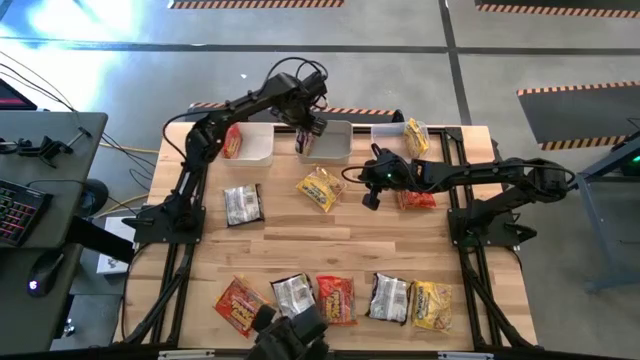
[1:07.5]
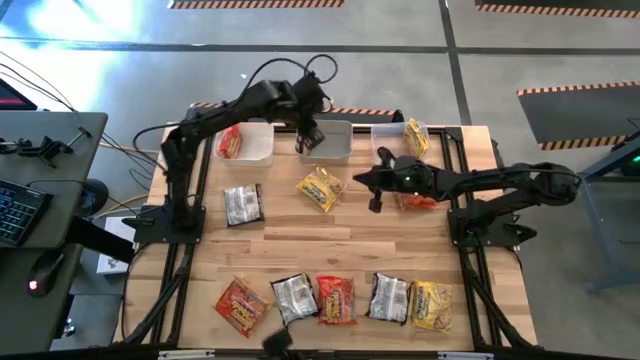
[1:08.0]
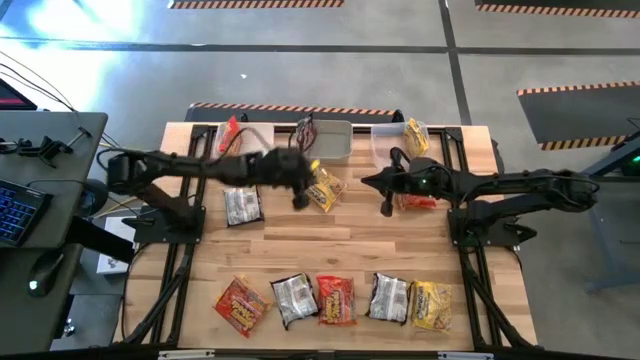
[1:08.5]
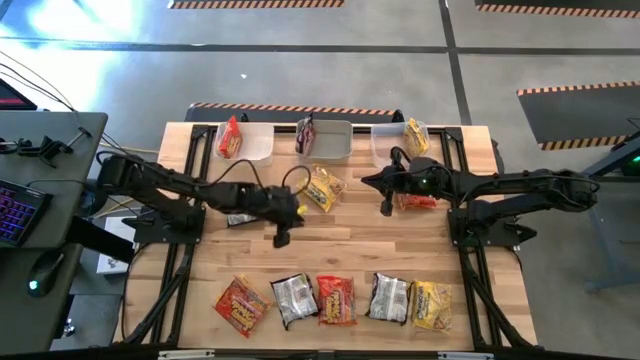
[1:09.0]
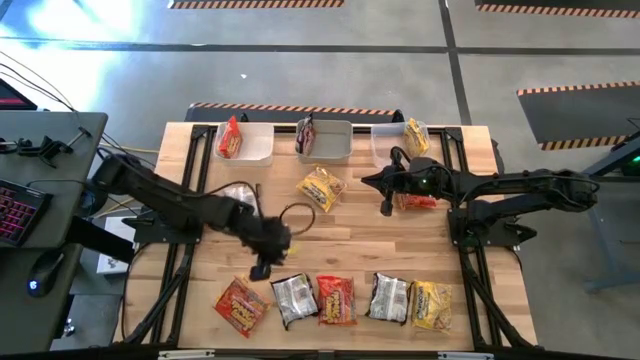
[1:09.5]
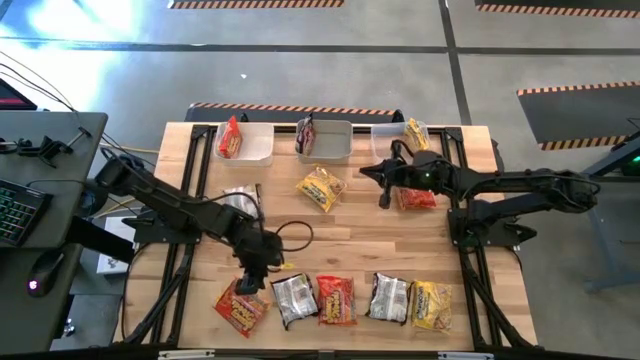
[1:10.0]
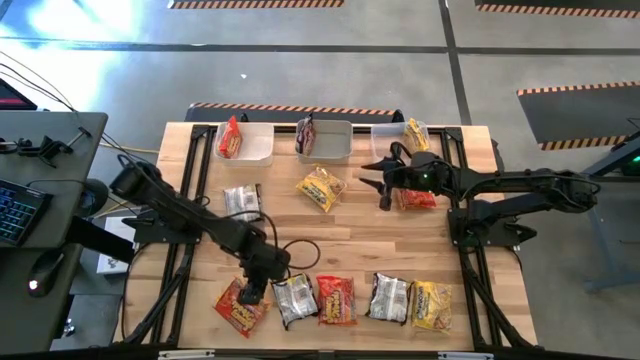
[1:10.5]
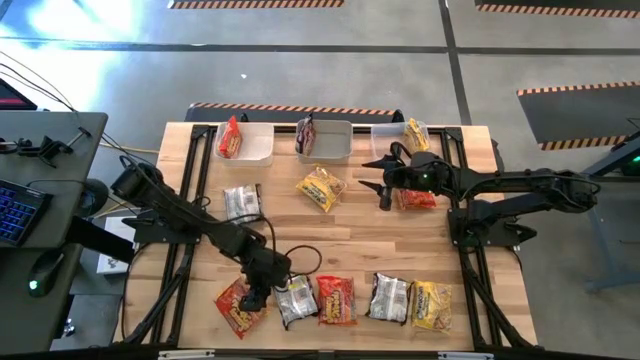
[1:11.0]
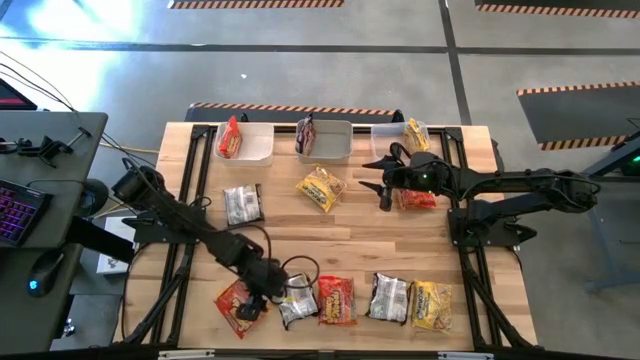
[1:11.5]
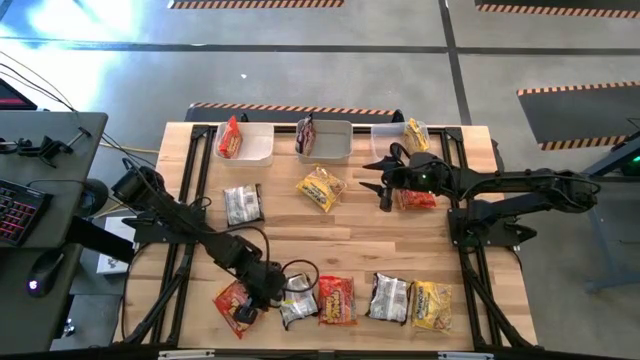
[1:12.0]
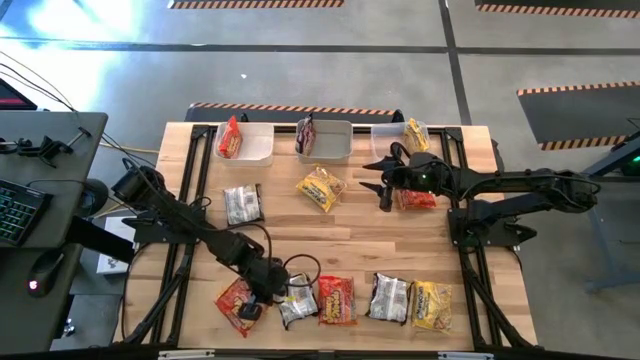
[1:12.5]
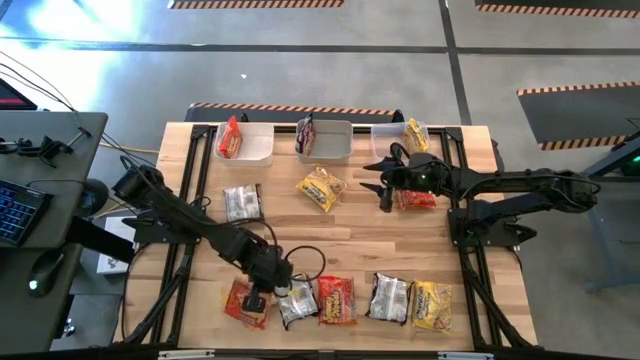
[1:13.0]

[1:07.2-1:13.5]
Task: Sort Maruchan noodles
Put the orange noodle pack into the white bin

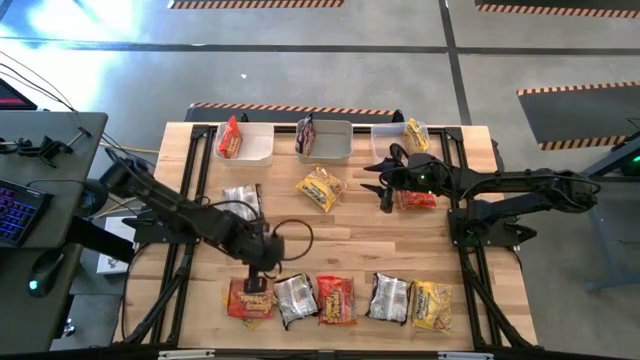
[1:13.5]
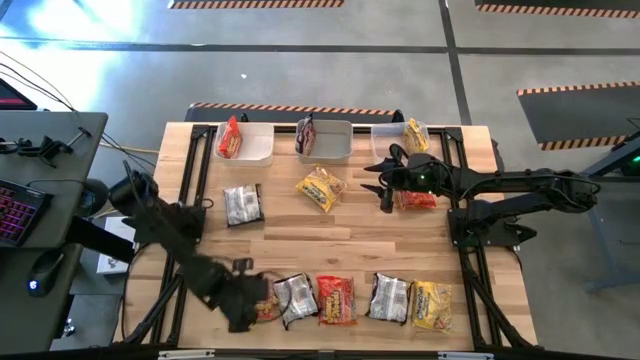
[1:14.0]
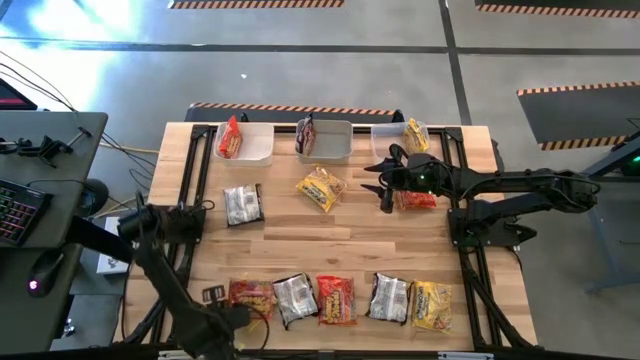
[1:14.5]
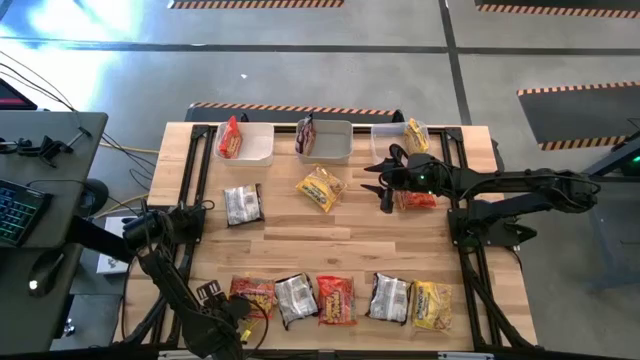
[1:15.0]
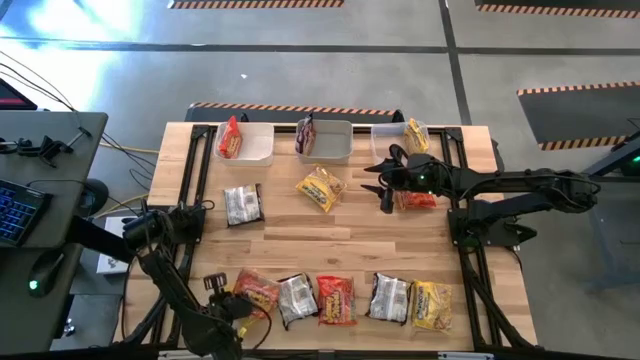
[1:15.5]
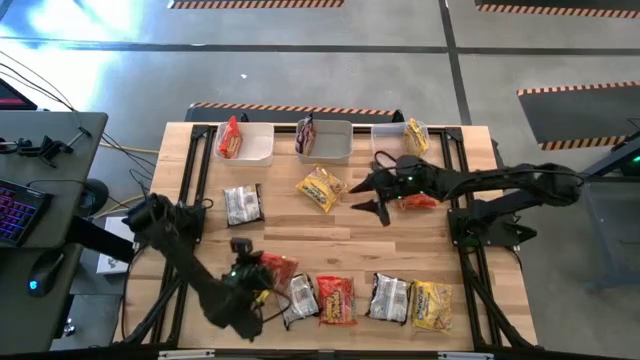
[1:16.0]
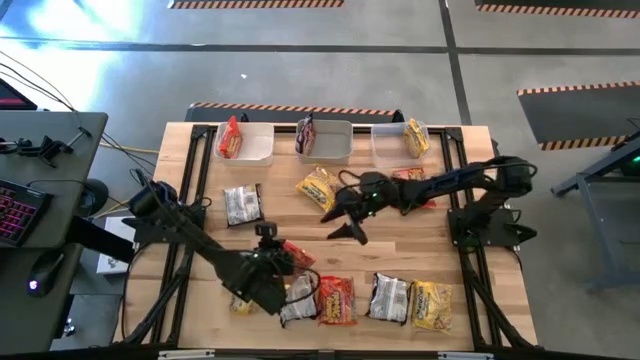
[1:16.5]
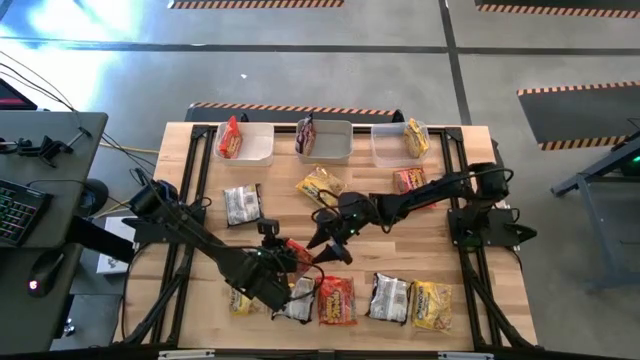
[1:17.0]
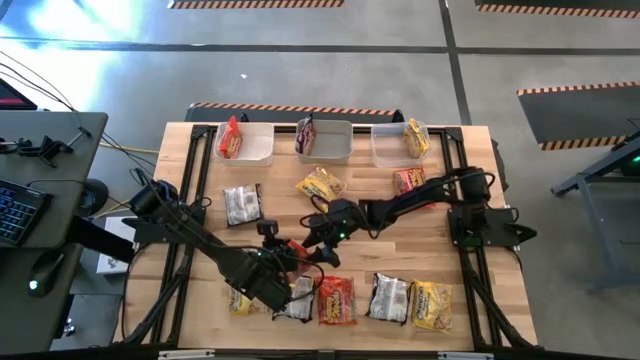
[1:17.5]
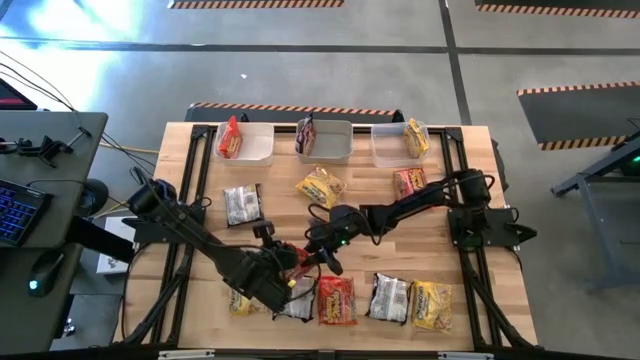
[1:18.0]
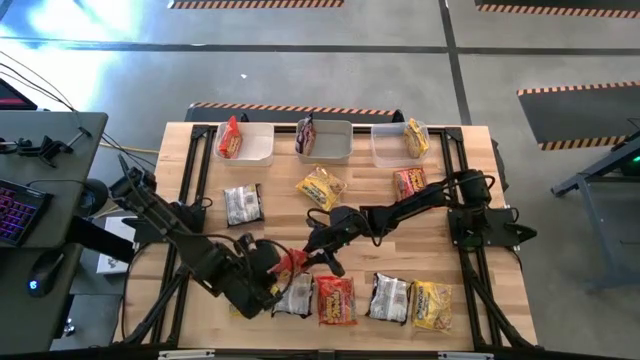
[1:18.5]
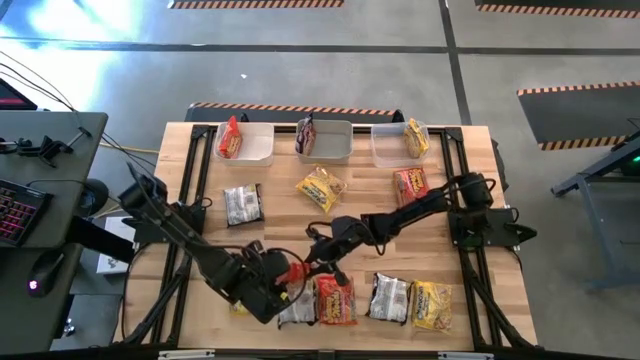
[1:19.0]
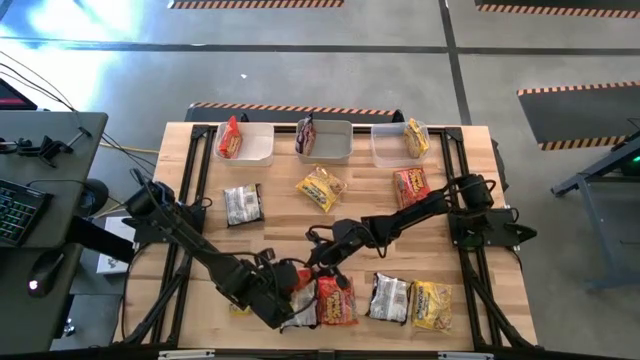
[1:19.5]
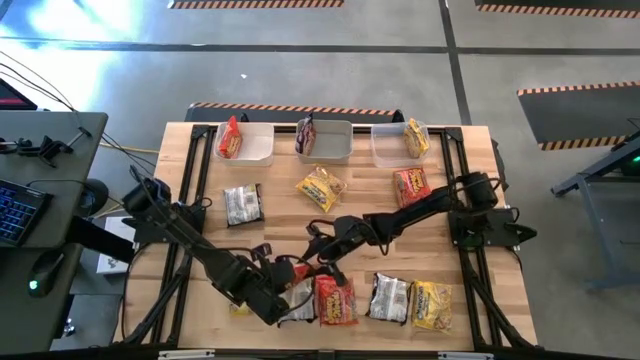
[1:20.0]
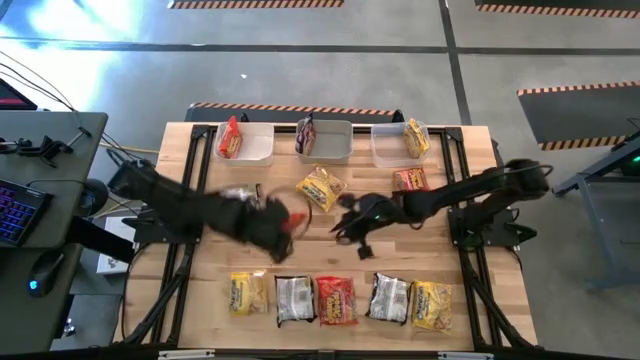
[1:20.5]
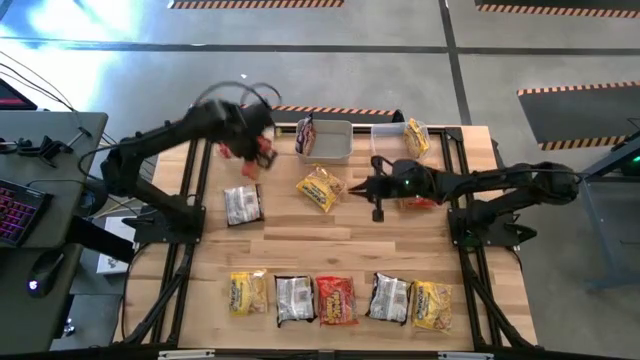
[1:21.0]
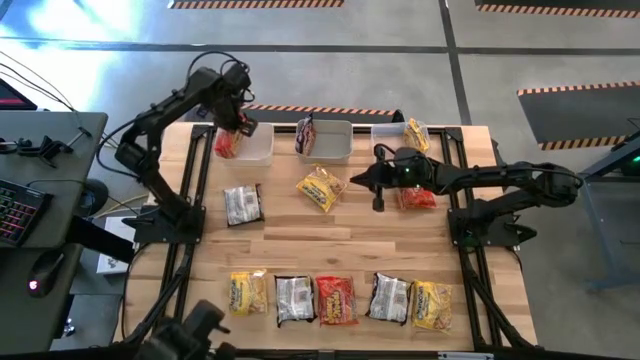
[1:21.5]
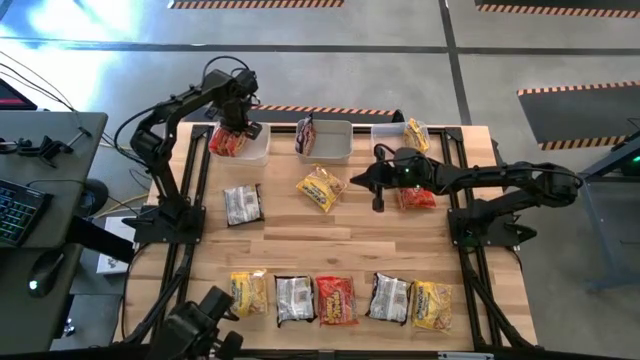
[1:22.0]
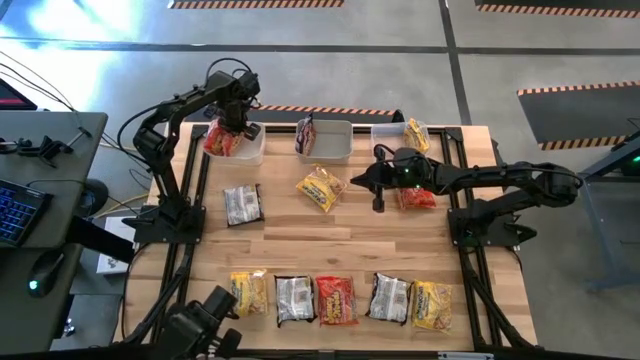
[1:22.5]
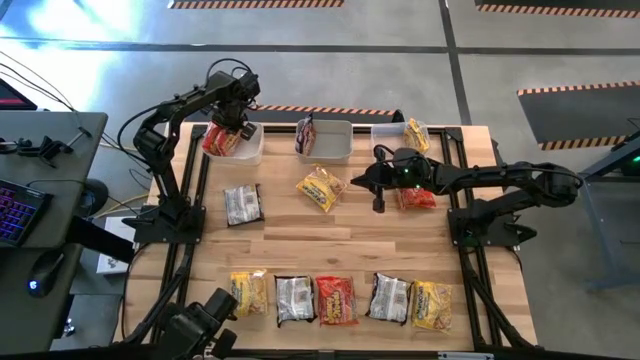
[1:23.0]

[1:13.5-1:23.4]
Put the orange noodle pack into the white bin

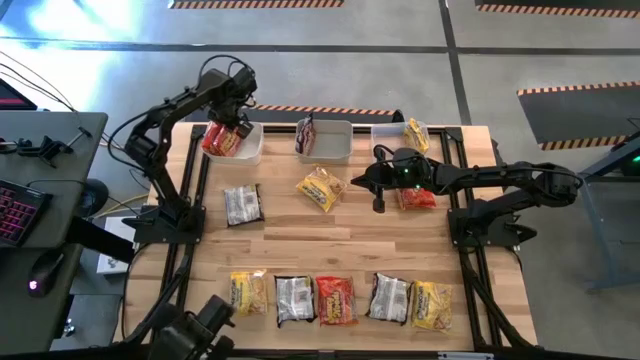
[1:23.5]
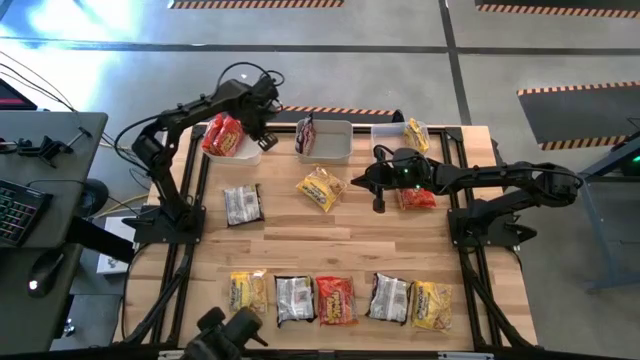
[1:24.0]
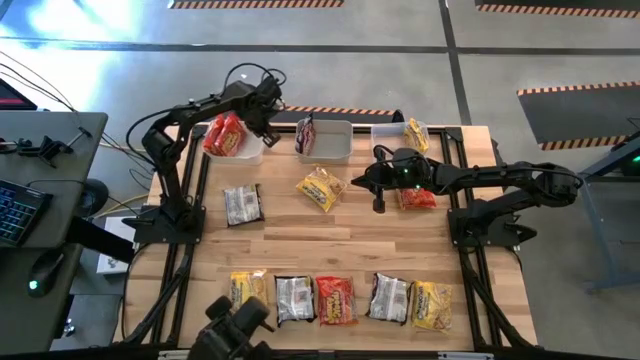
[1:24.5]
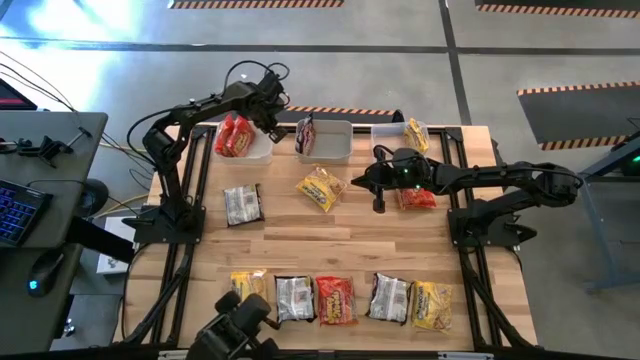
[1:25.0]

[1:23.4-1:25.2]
Adjust the white bin

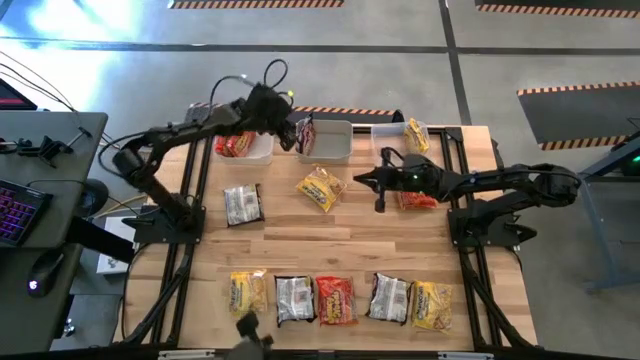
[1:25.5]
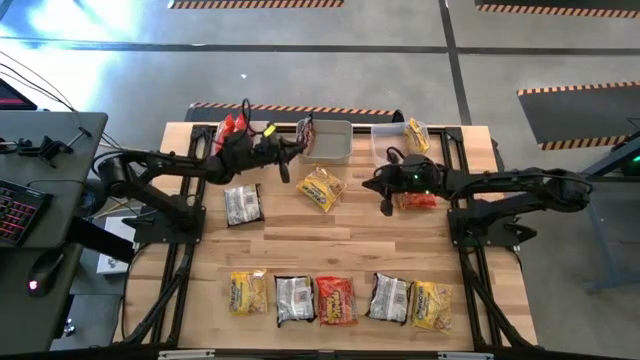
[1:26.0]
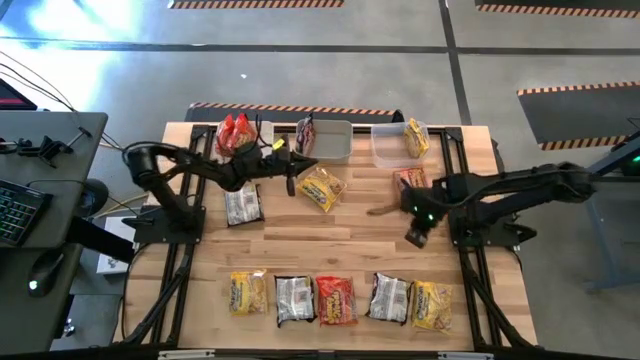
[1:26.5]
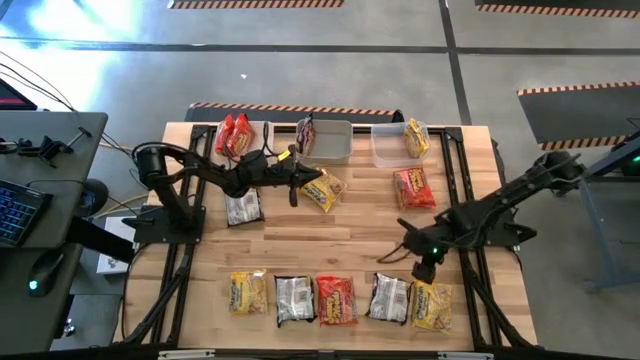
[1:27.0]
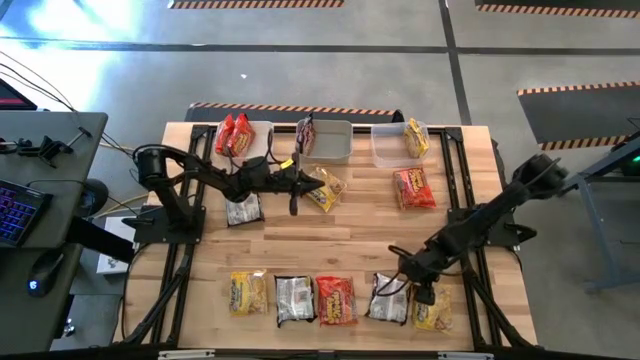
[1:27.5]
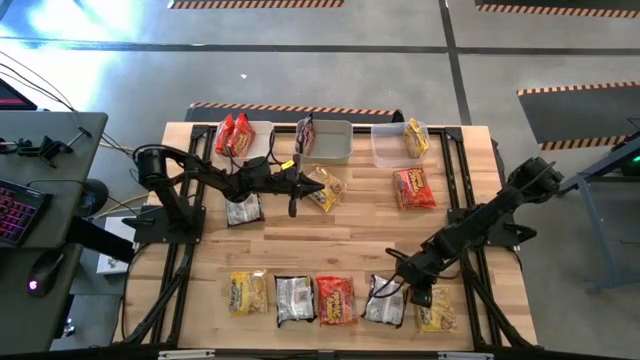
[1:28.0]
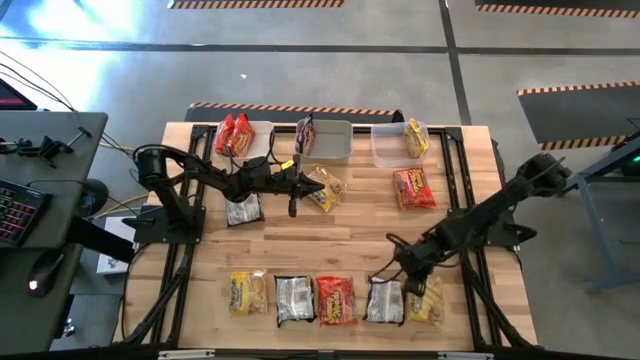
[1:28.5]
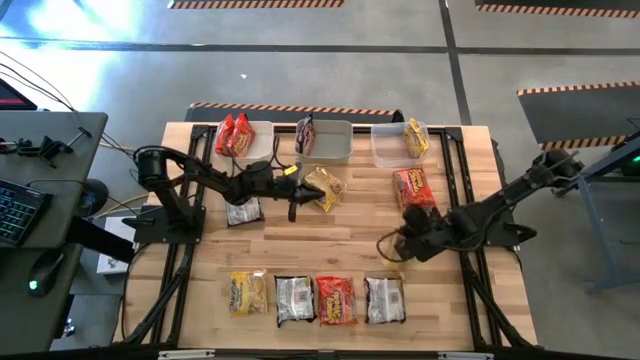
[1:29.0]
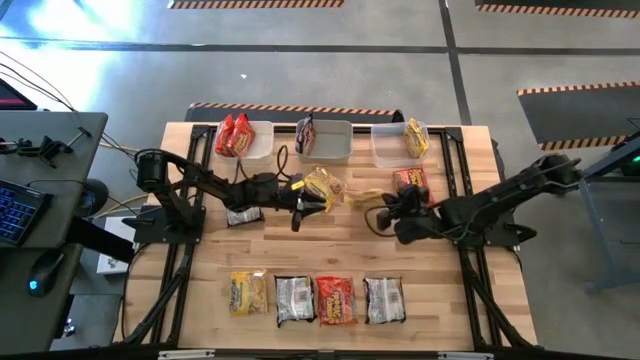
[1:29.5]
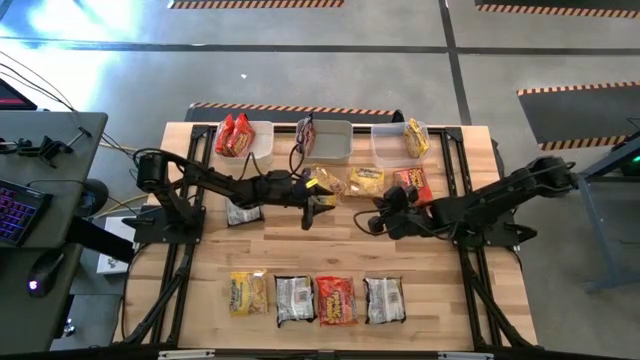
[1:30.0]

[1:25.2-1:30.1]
Put the yellow noodle pack into the transparent bin
